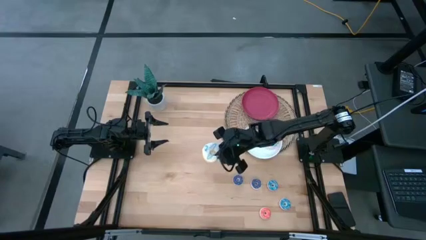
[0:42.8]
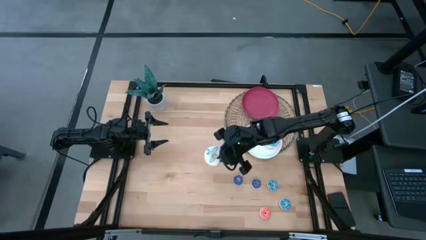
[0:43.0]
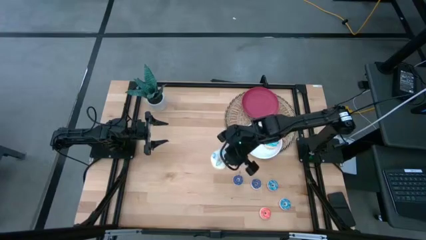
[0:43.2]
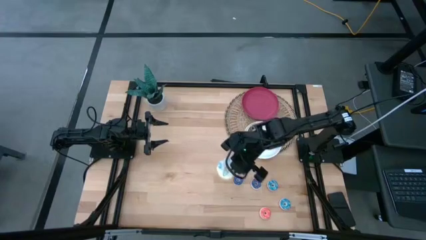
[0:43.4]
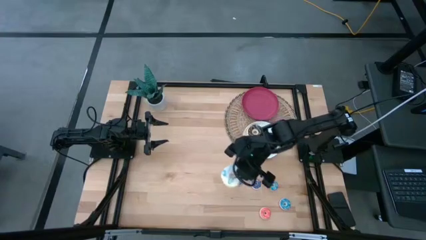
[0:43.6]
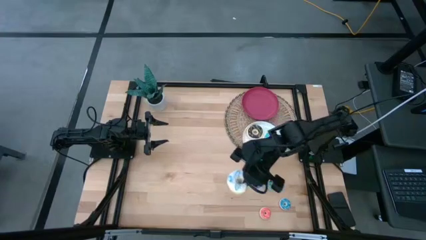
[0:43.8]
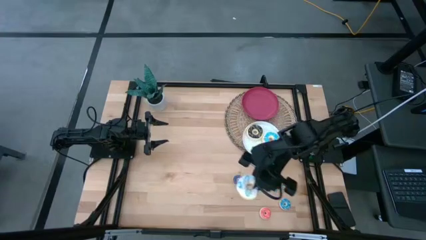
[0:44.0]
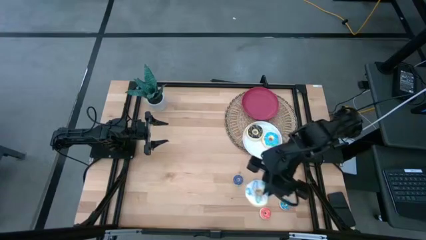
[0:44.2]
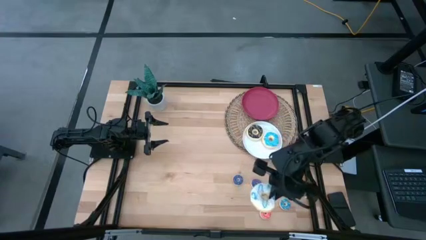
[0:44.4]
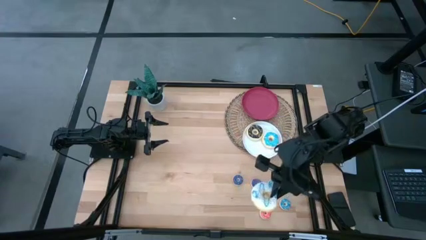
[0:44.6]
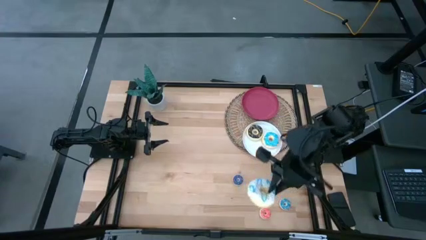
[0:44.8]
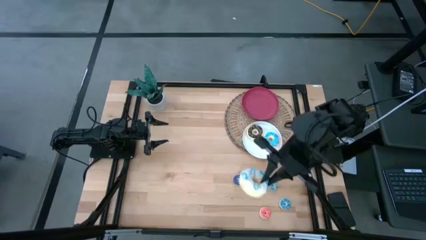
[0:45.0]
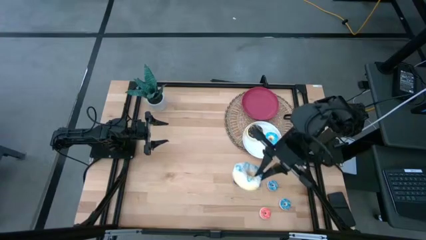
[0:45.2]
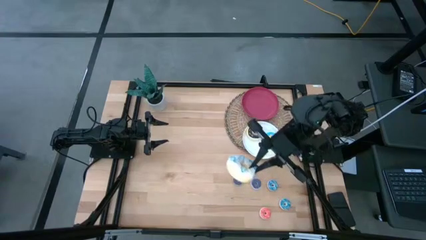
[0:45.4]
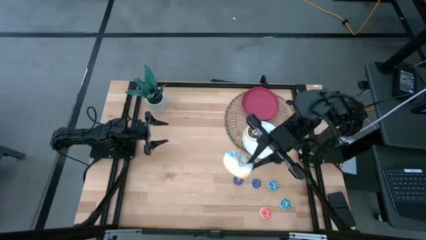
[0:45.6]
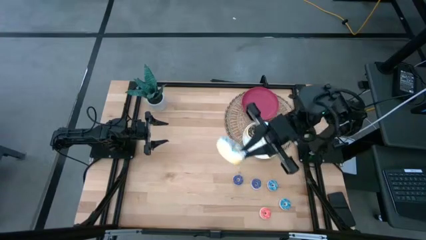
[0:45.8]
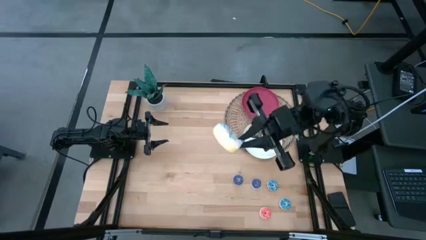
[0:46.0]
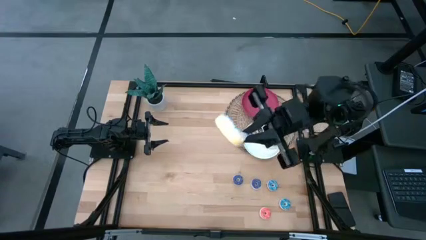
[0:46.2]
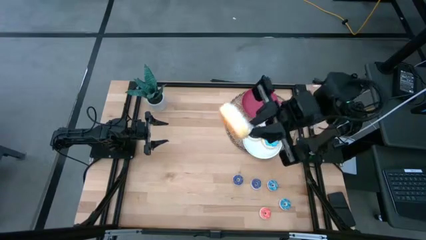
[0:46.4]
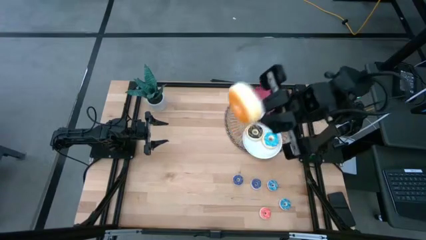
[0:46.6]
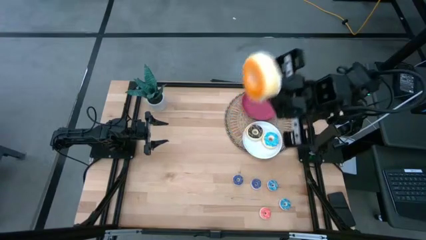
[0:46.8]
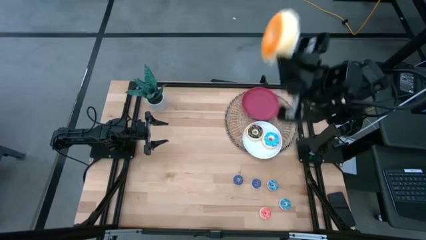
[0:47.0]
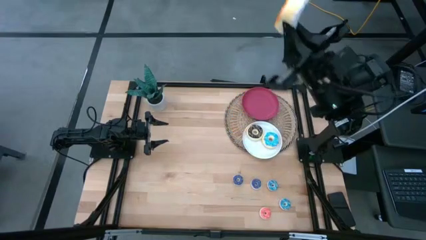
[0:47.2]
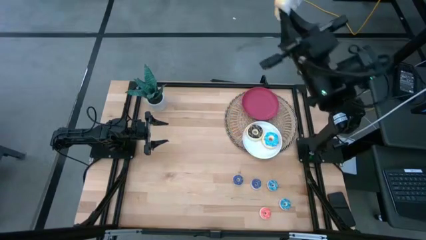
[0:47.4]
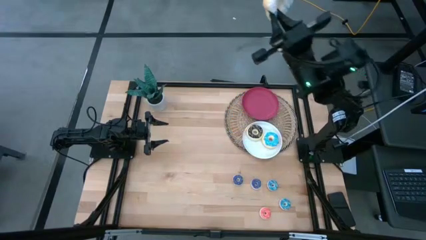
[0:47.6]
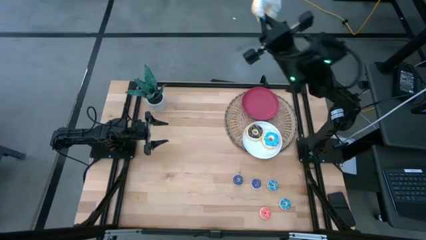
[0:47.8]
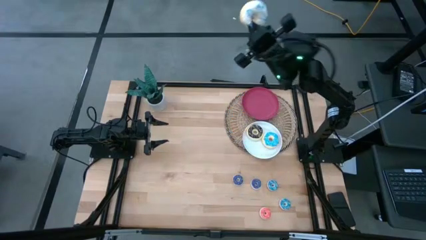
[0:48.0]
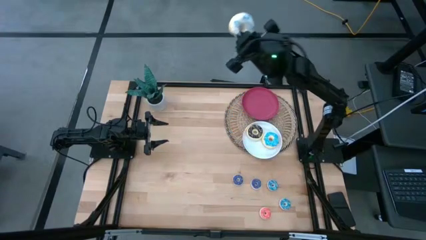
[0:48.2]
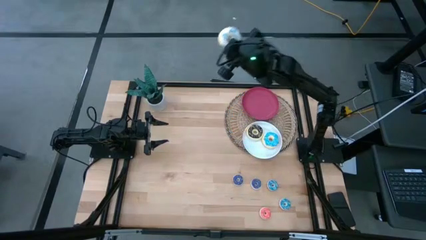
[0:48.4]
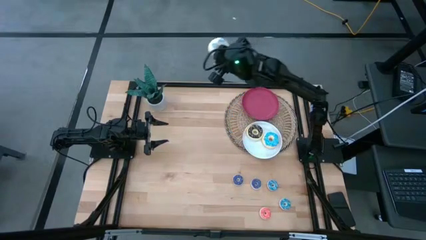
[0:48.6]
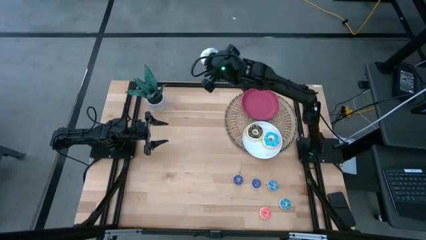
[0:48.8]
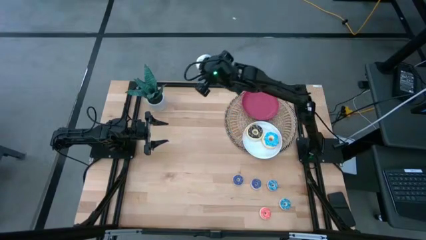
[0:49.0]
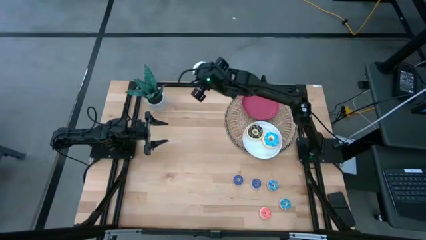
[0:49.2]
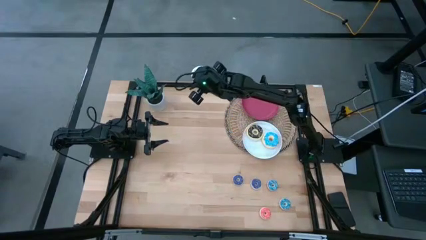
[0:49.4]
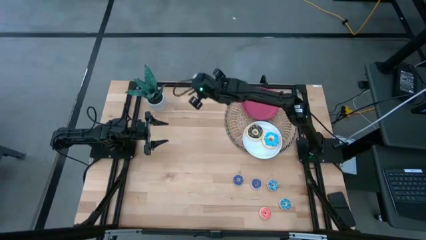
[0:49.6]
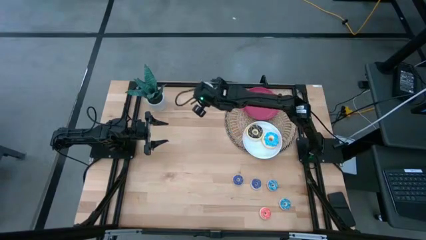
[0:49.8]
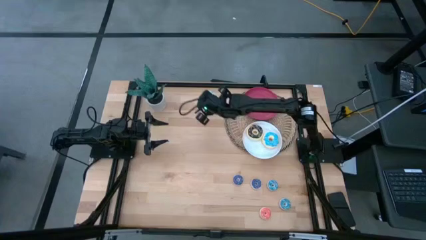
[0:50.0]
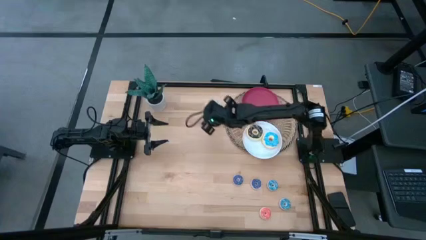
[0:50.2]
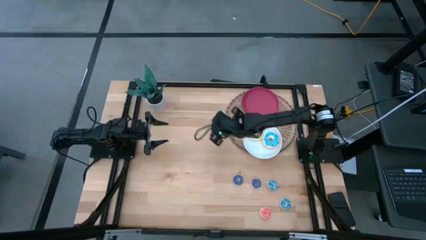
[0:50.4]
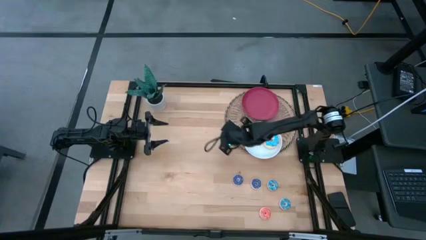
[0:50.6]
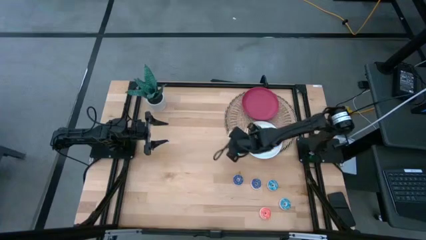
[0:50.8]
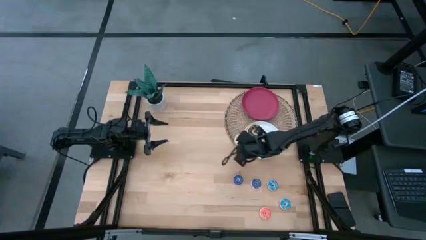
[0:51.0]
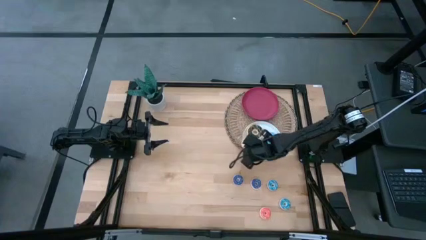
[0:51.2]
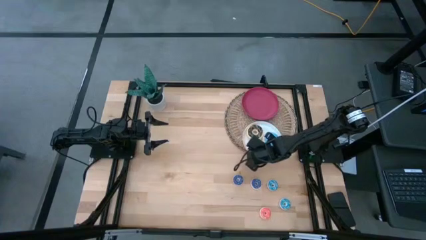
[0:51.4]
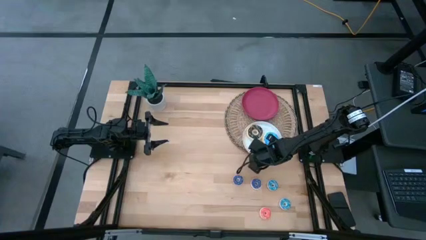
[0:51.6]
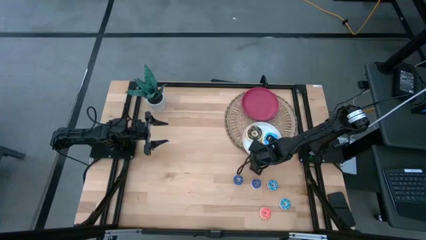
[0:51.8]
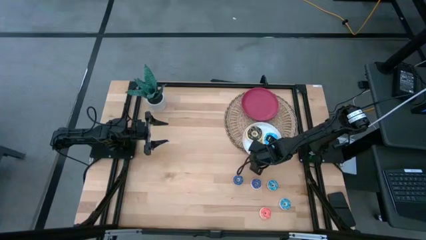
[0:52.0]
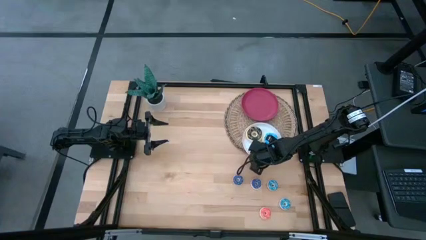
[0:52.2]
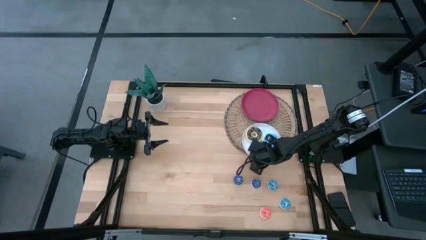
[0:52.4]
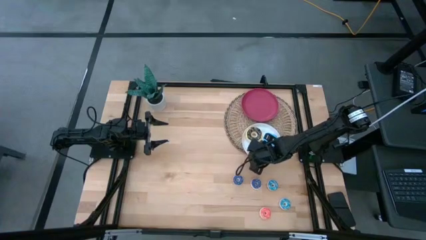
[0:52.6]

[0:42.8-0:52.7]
Task: Pick & Place donuts
Put the big white donut on the white plate
